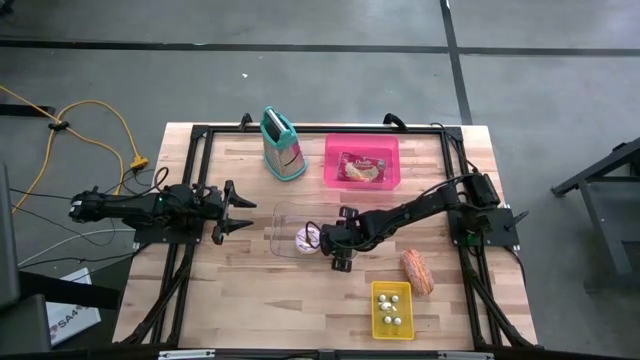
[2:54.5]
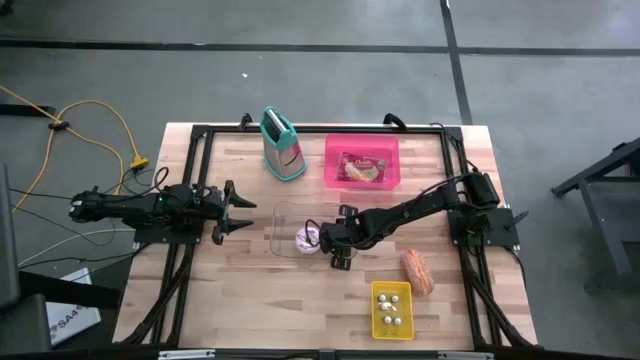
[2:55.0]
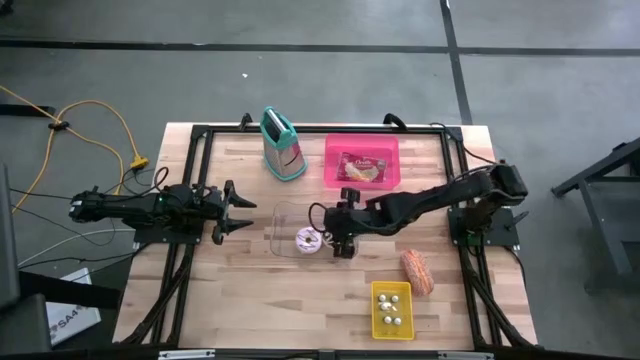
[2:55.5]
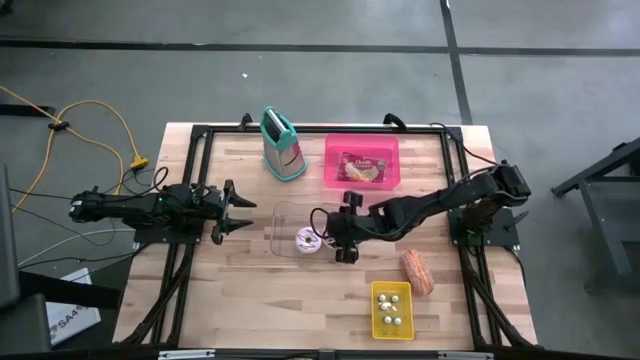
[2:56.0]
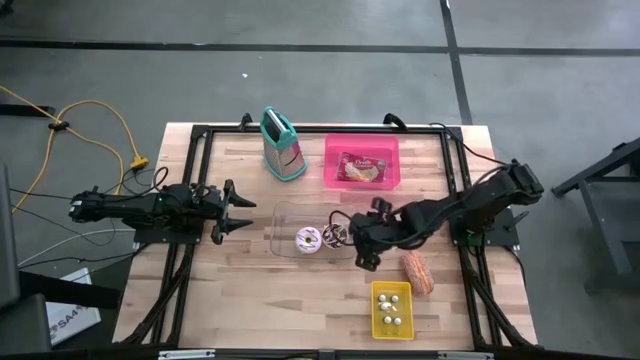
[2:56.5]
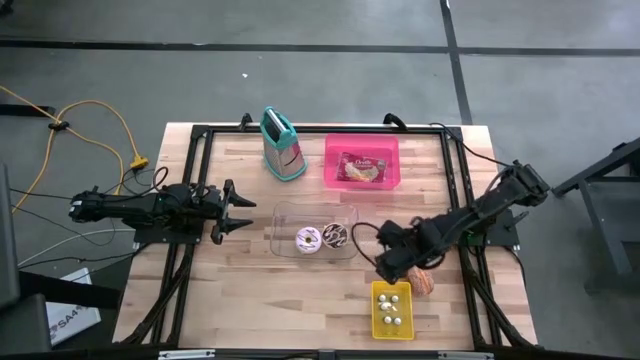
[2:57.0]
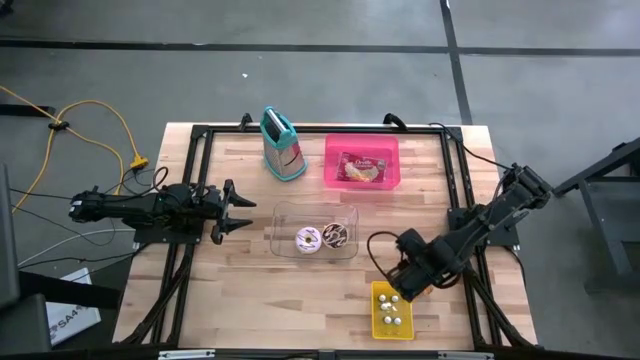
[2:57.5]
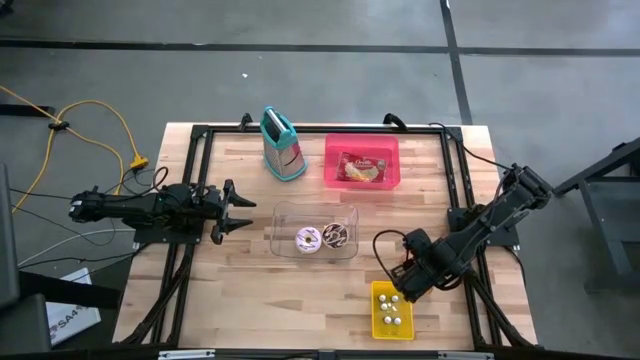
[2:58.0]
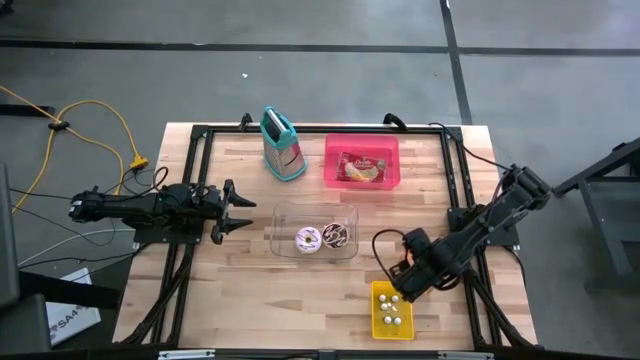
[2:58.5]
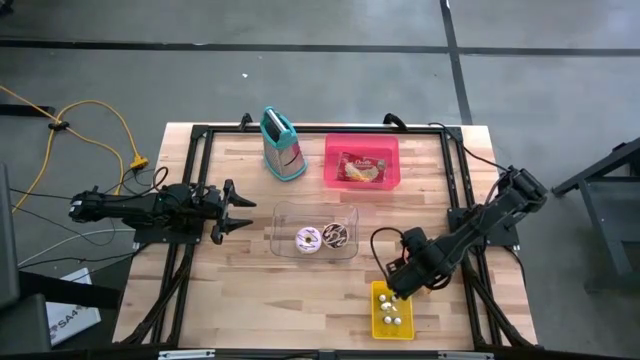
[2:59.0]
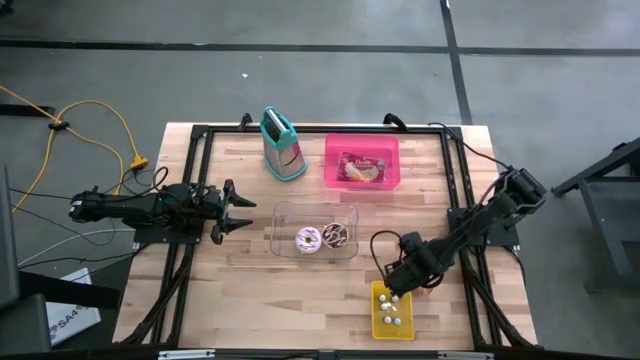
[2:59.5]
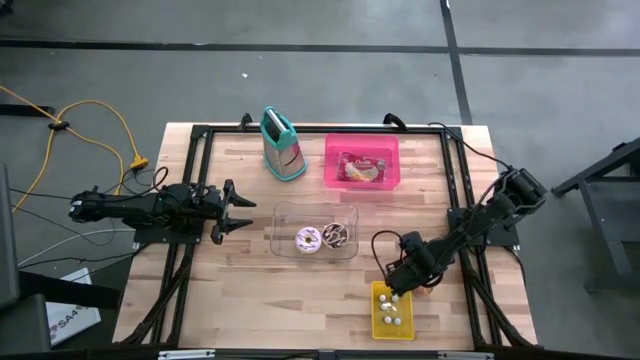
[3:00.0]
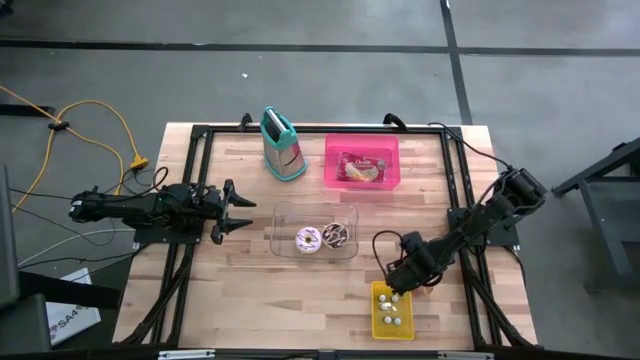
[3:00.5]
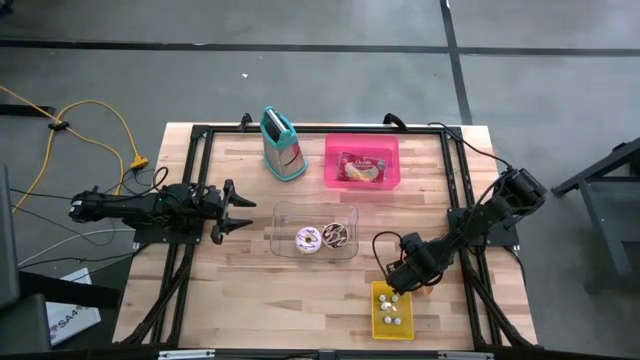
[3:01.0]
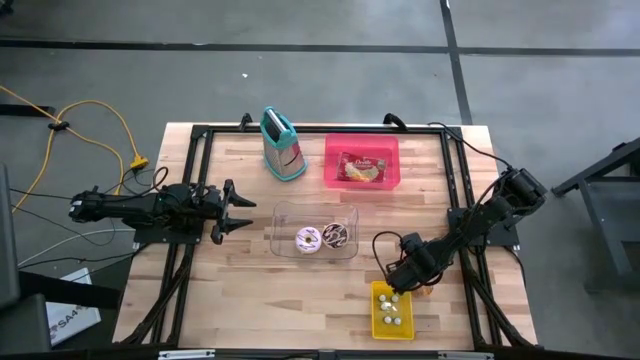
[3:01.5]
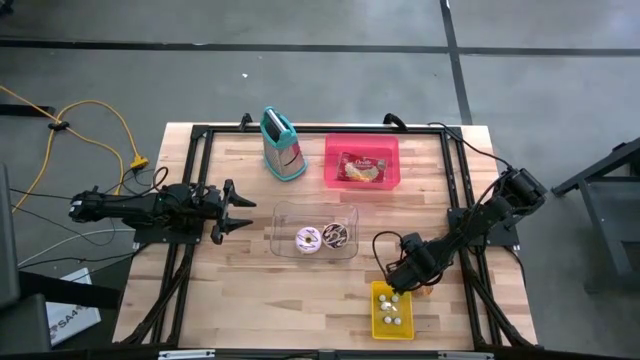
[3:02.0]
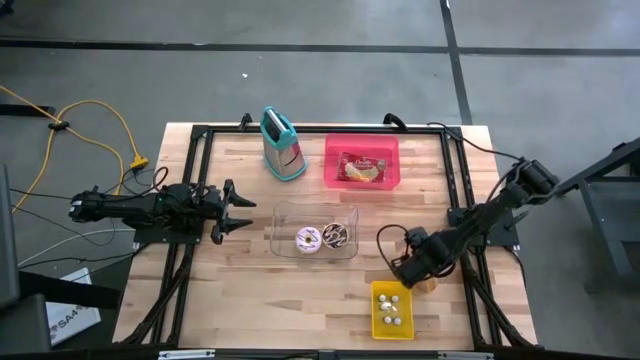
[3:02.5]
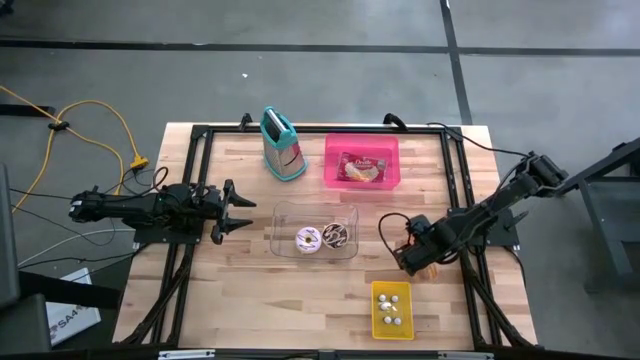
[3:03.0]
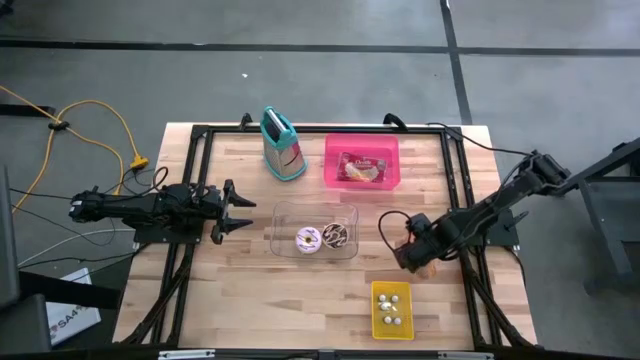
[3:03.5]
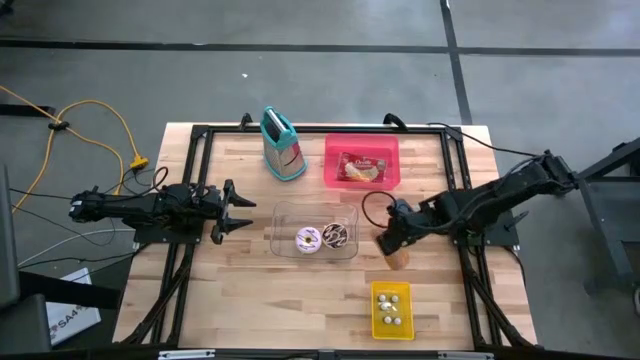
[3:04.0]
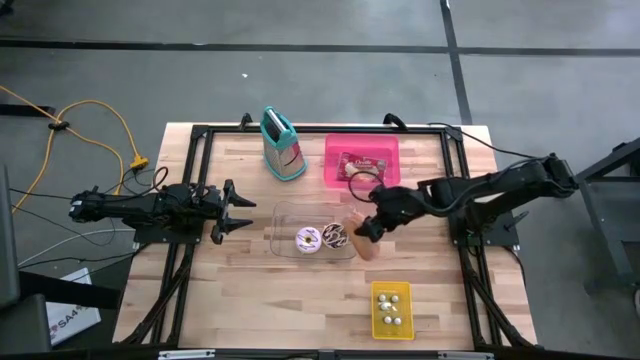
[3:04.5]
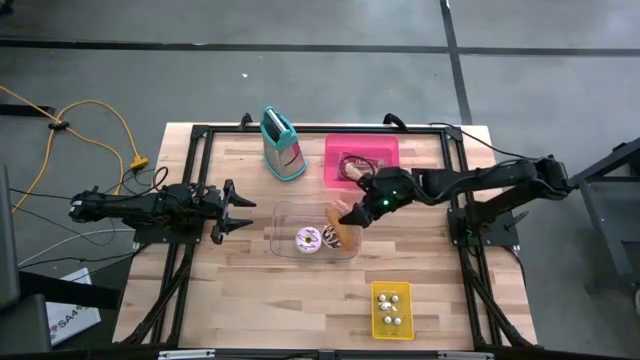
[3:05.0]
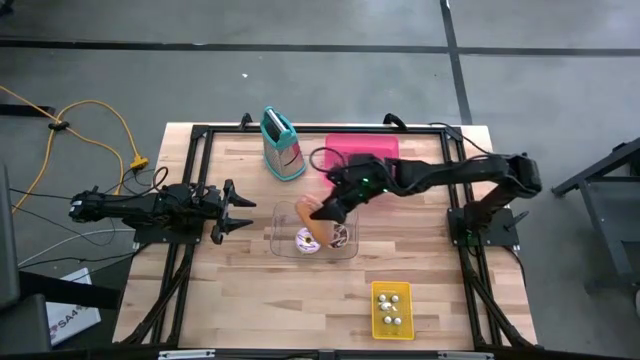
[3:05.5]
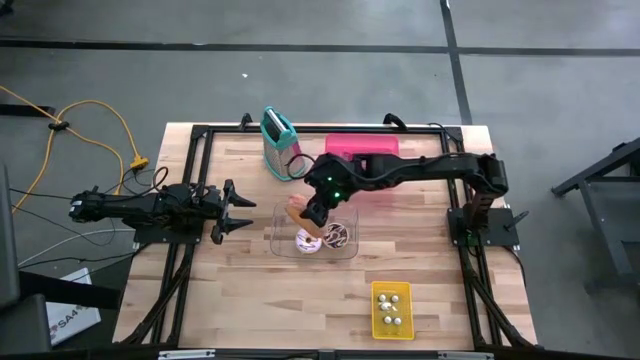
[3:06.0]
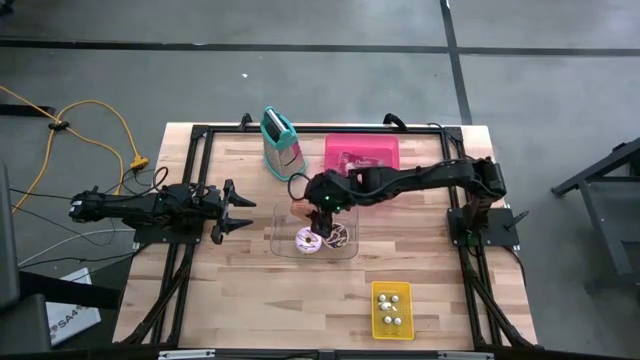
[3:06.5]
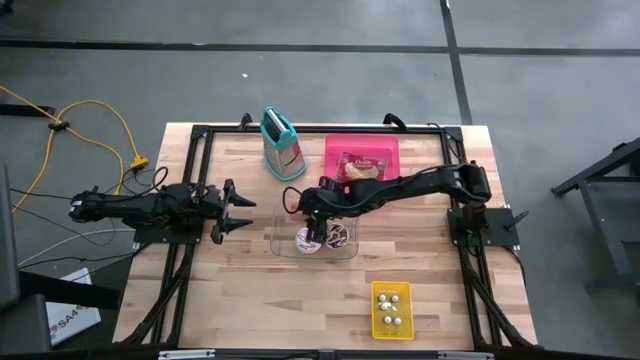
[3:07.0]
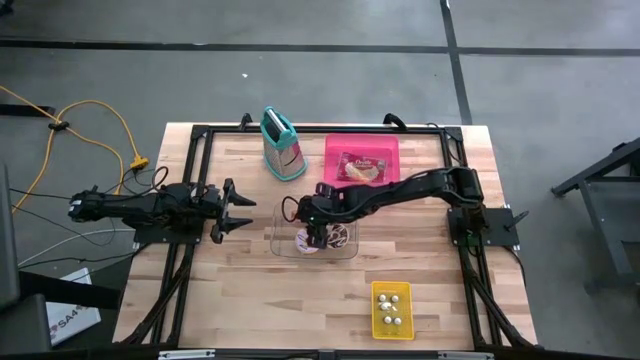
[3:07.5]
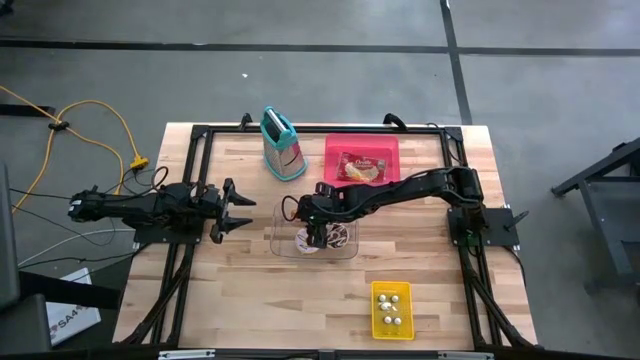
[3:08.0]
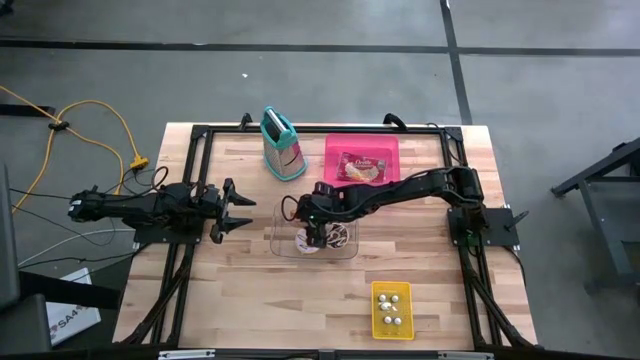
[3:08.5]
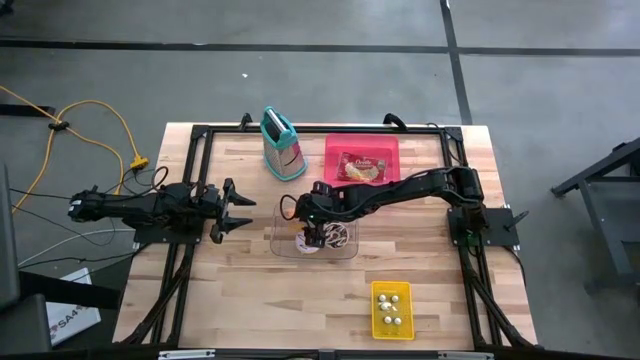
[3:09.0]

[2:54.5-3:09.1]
Put the brown donut into the transparent bin
